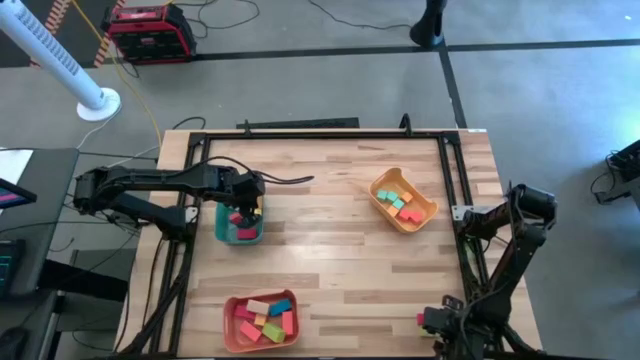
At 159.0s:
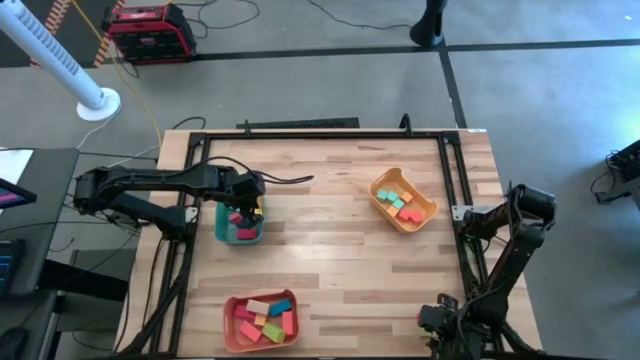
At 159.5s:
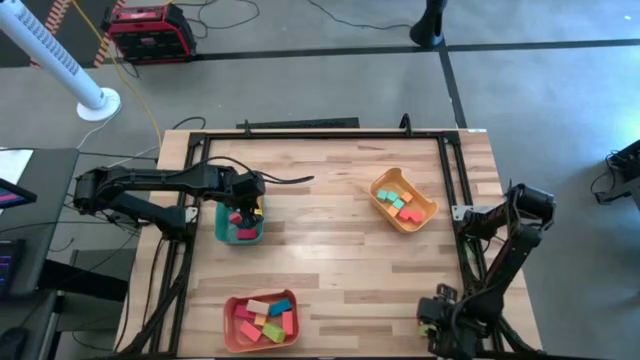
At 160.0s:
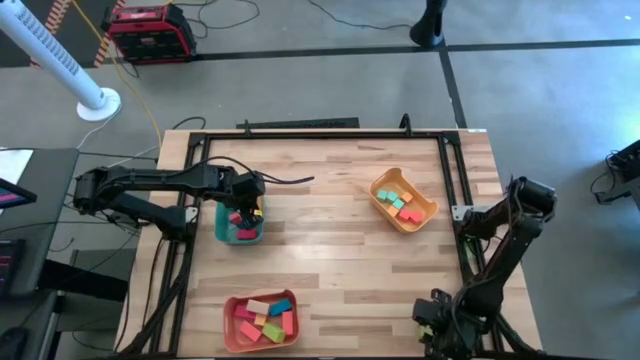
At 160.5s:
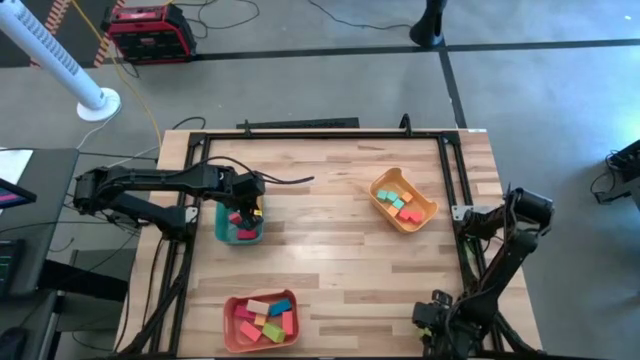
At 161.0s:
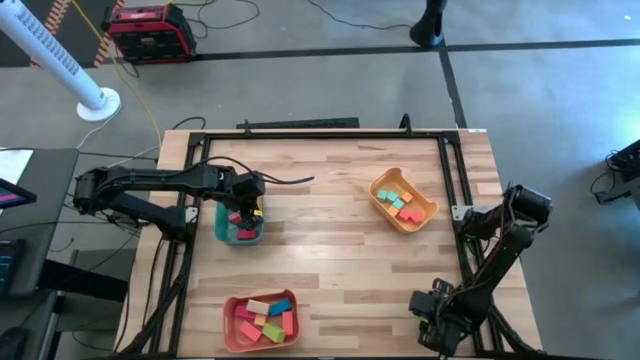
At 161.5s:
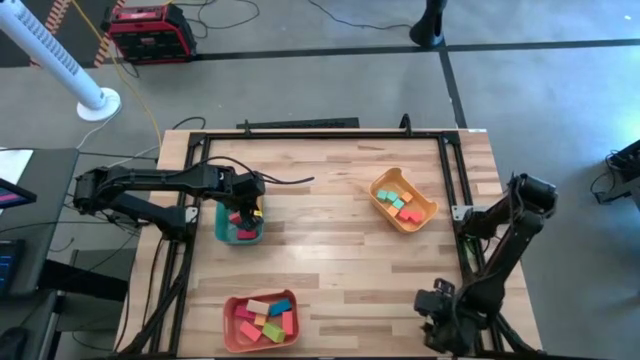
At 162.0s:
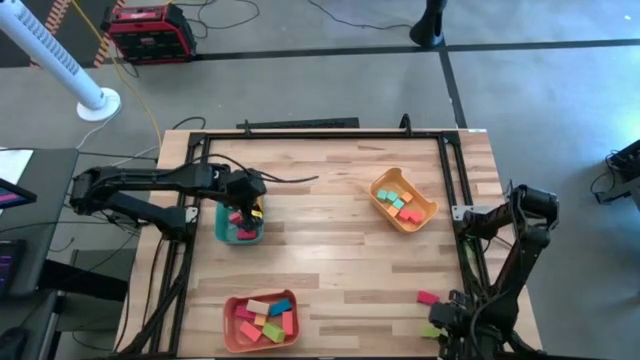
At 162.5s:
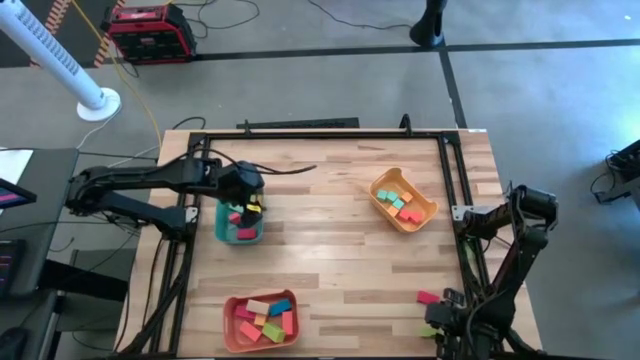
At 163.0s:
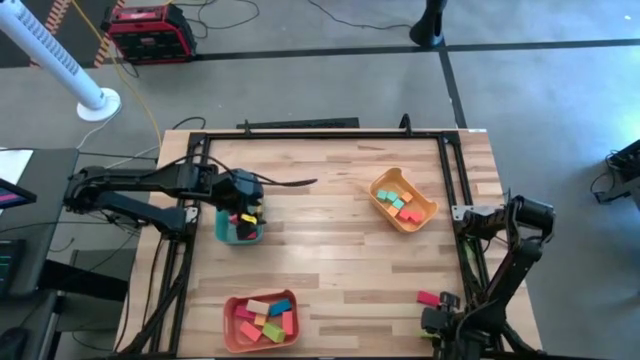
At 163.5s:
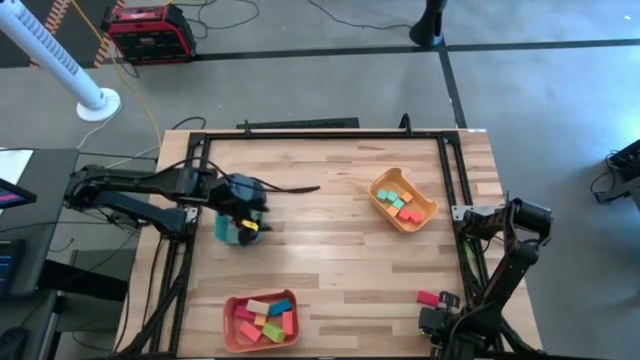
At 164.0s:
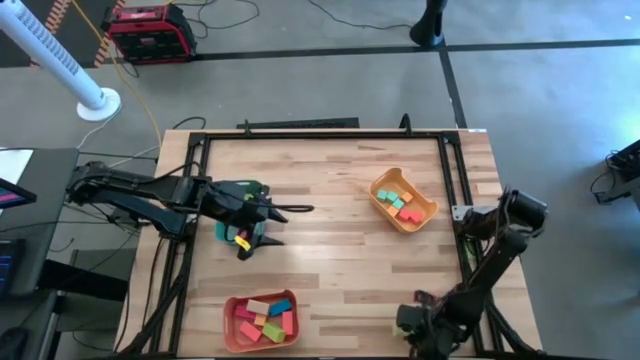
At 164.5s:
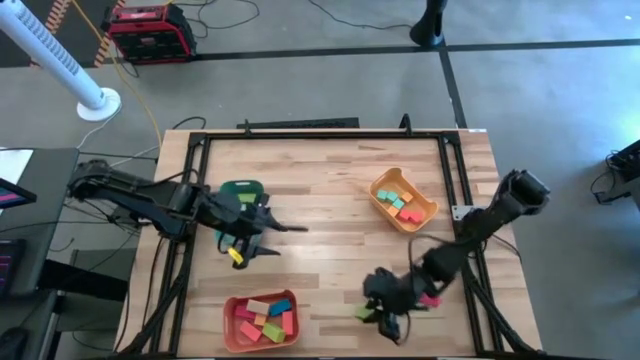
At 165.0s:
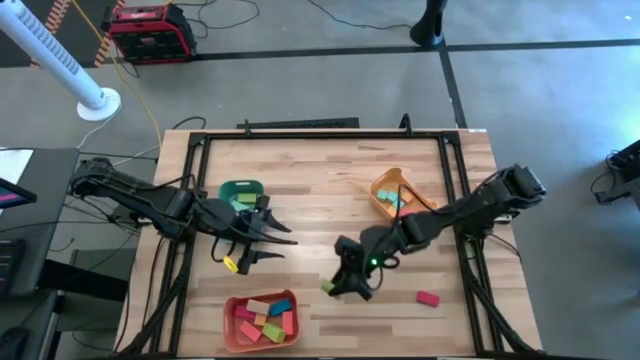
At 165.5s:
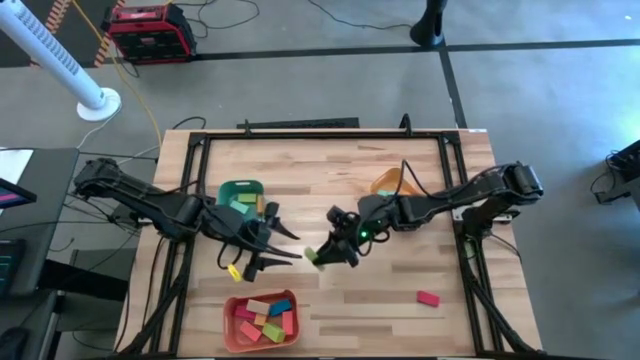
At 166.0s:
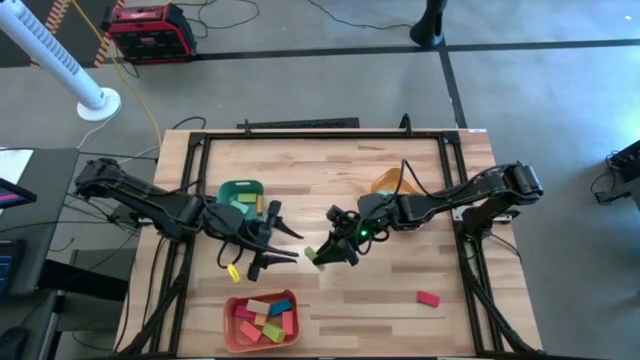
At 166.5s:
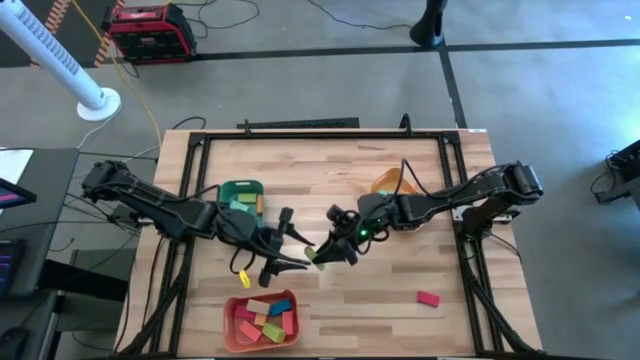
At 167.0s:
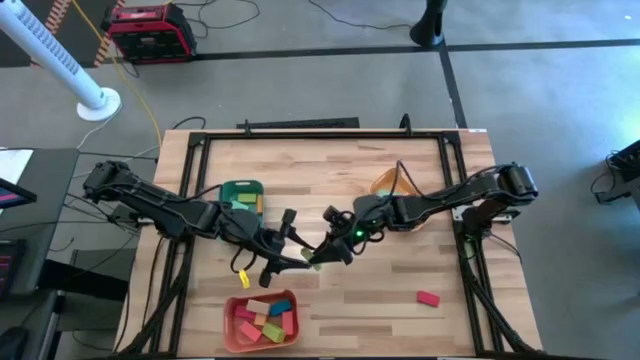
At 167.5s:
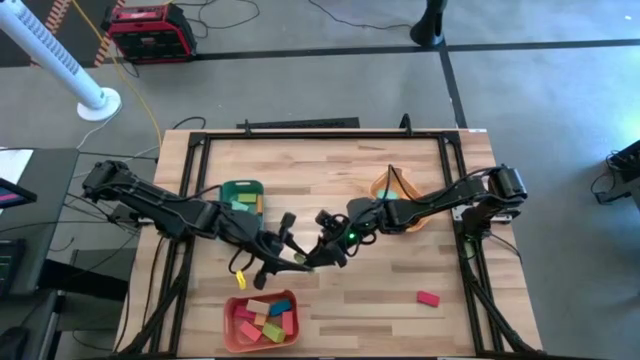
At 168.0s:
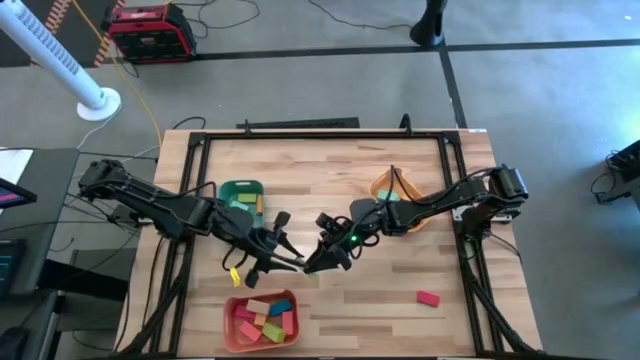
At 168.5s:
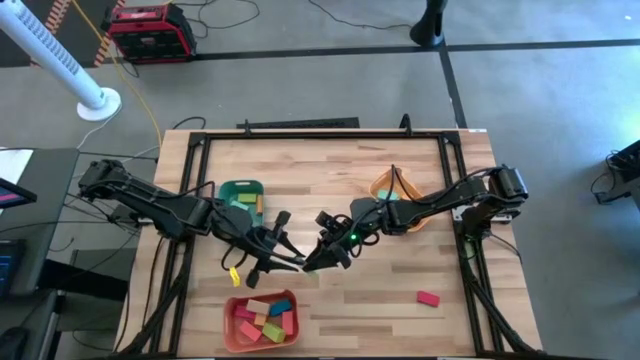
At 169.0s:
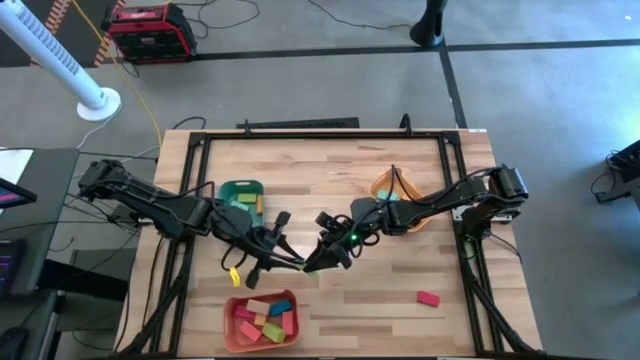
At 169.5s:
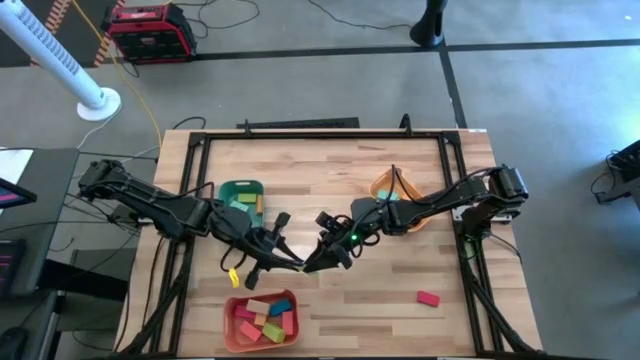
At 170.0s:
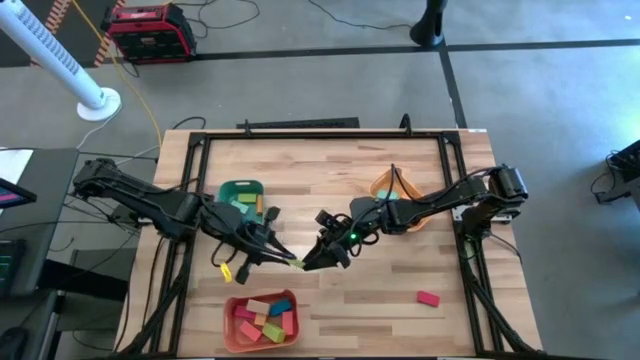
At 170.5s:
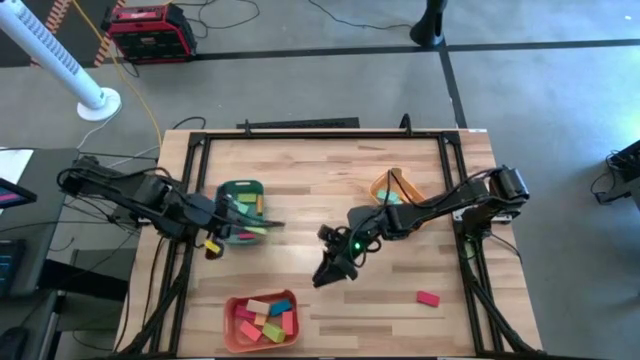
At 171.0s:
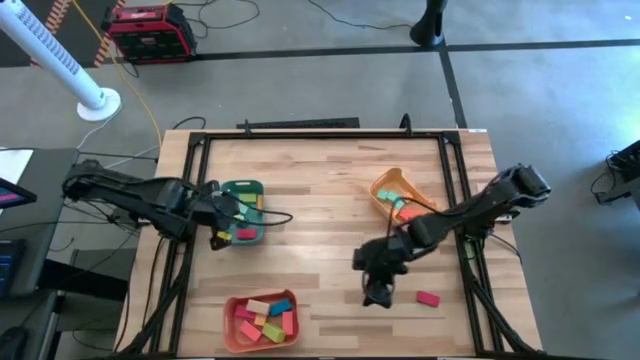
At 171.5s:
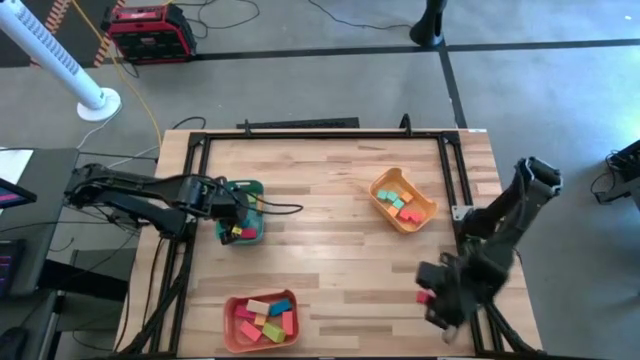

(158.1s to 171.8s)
Task: Sort blocks by size
Put the thin light green rectangular block into the green bin

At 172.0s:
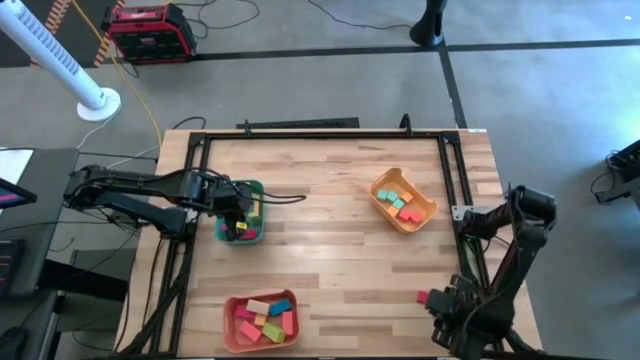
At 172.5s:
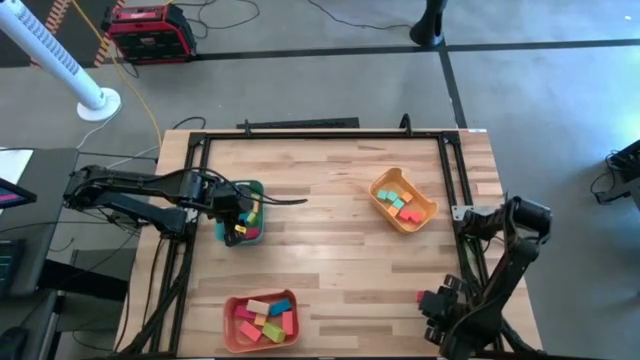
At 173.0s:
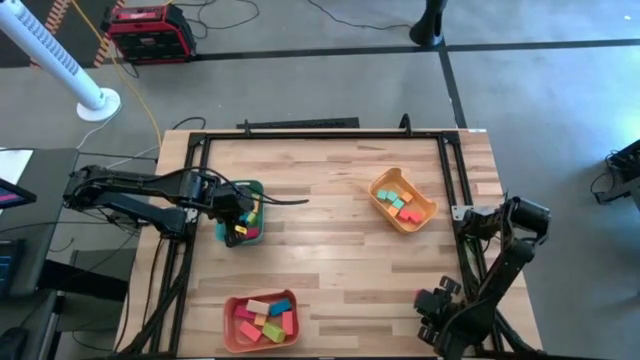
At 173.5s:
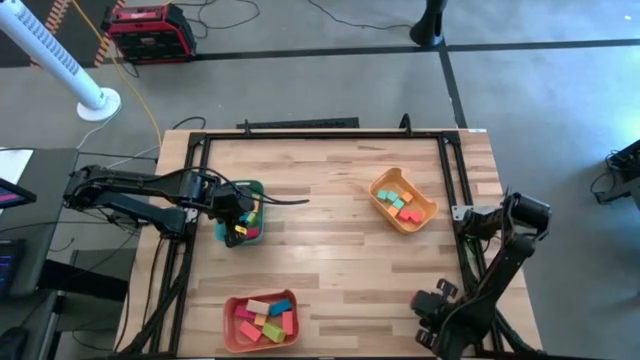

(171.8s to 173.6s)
Put the thin red rectangular block into the green bin

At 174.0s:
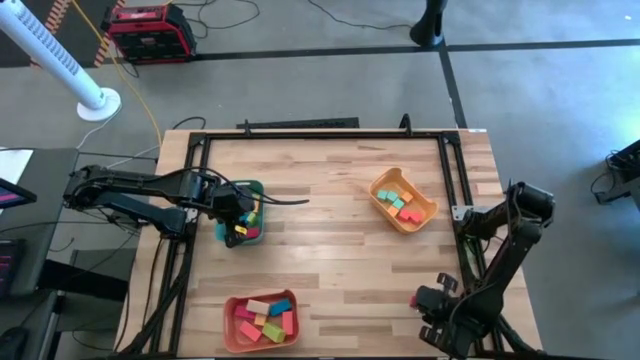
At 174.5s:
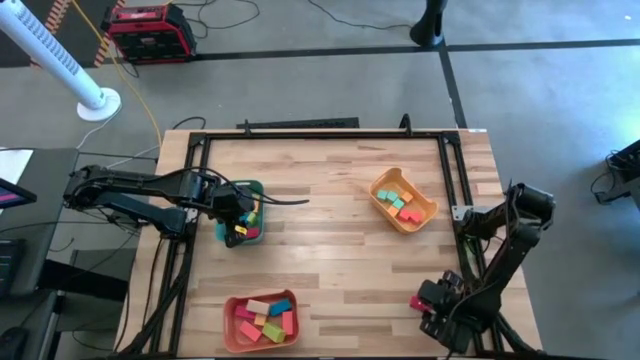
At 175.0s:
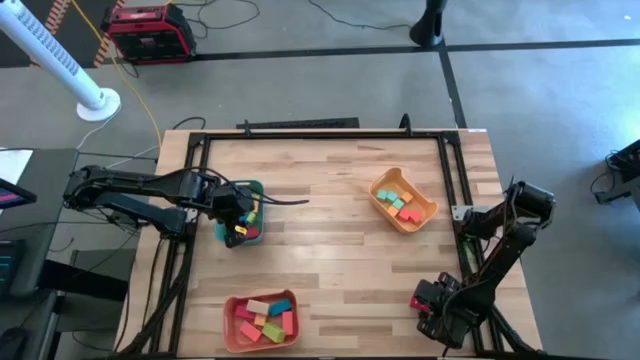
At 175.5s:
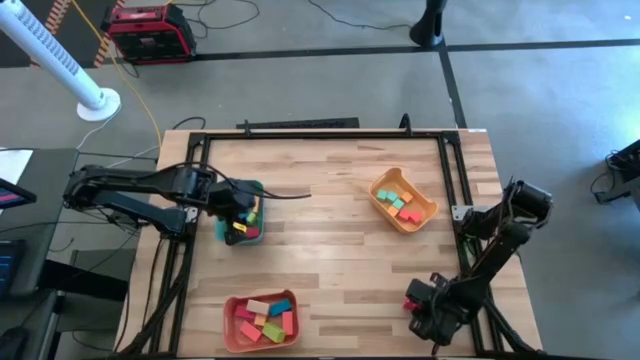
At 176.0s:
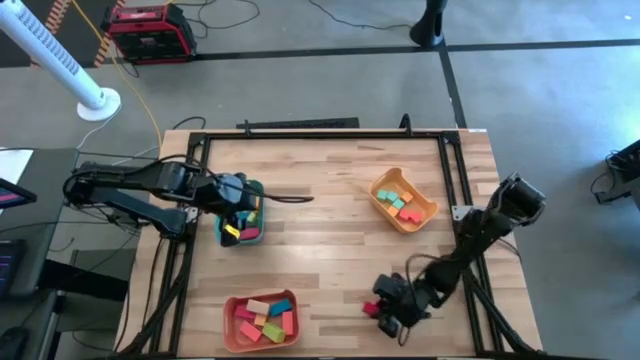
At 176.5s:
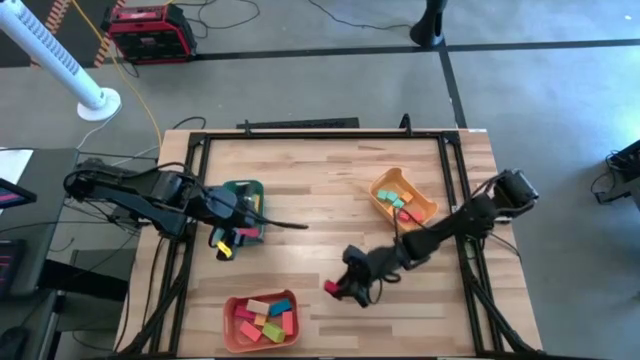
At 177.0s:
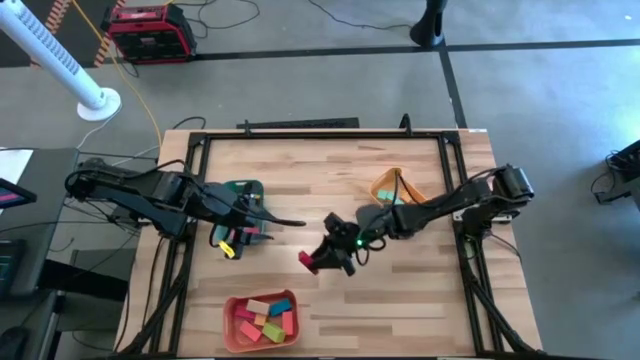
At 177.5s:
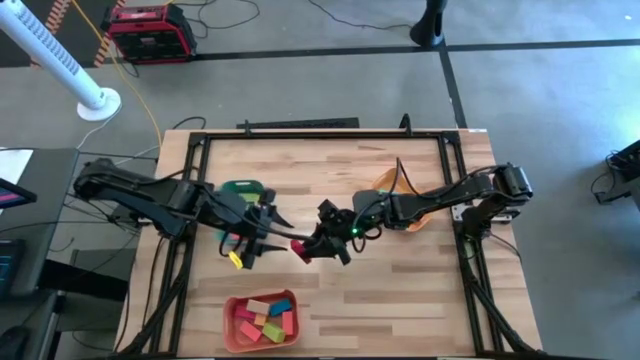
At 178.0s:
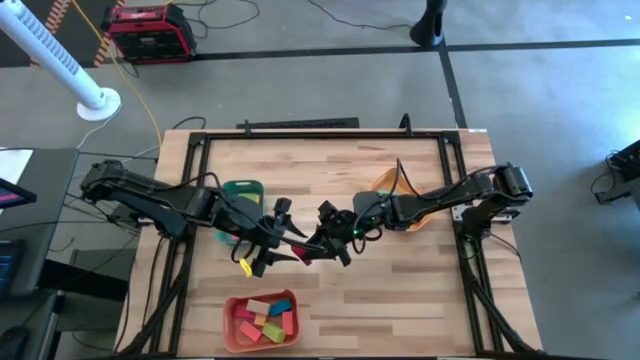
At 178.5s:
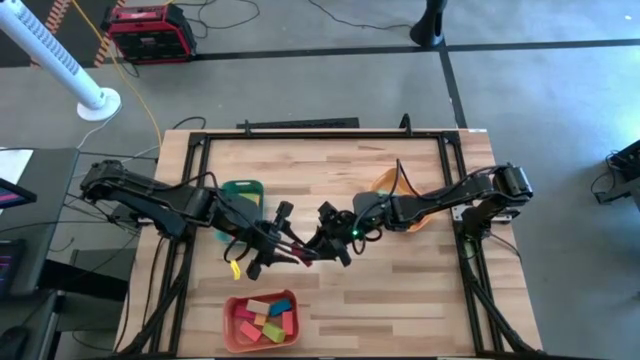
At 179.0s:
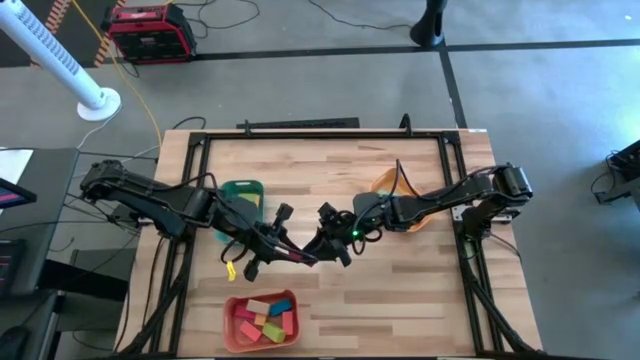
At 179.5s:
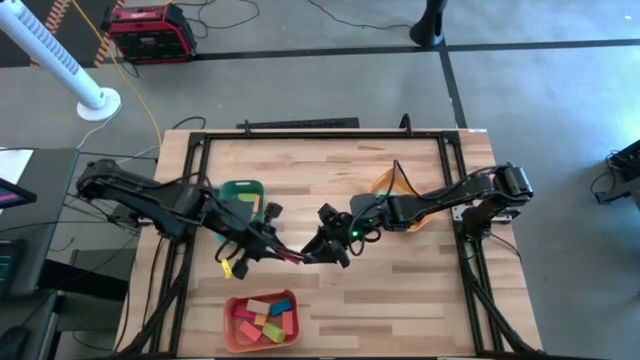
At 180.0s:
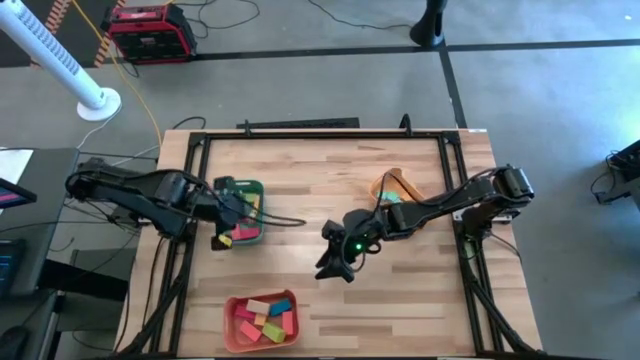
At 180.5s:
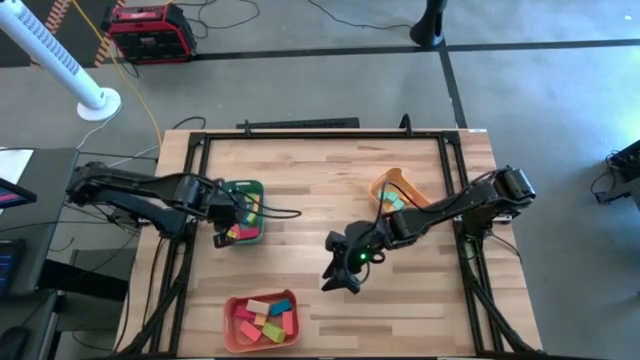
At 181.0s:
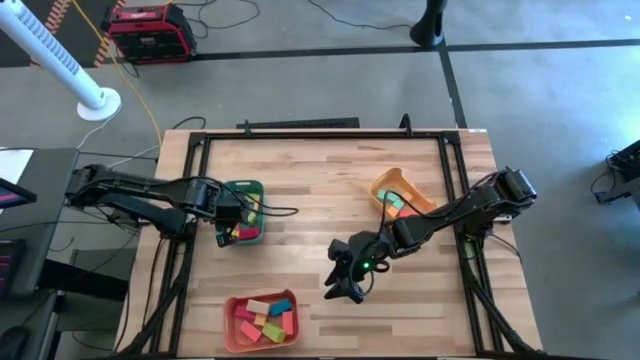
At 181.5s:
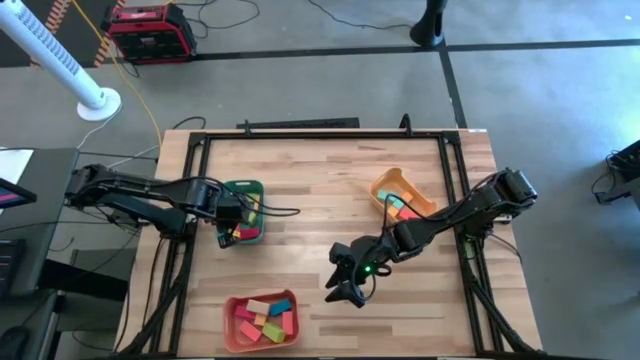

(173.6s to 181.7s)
Put the thin red rectangular block into the green bin
